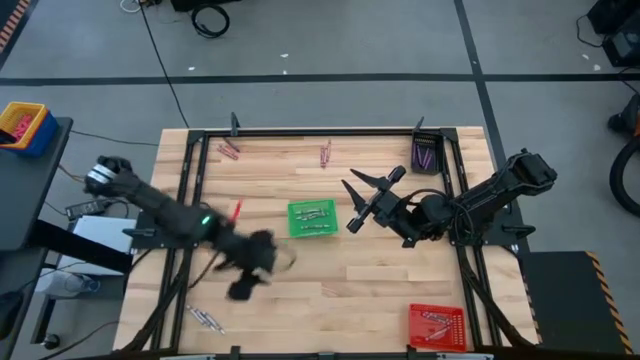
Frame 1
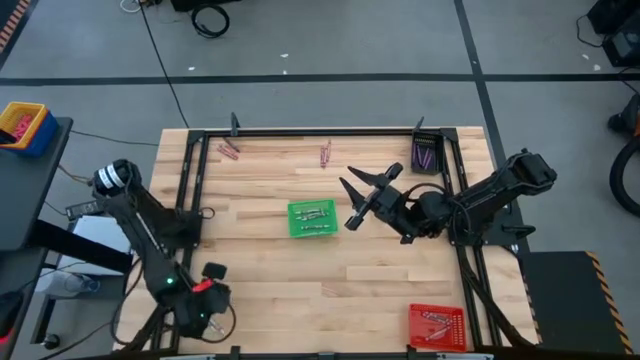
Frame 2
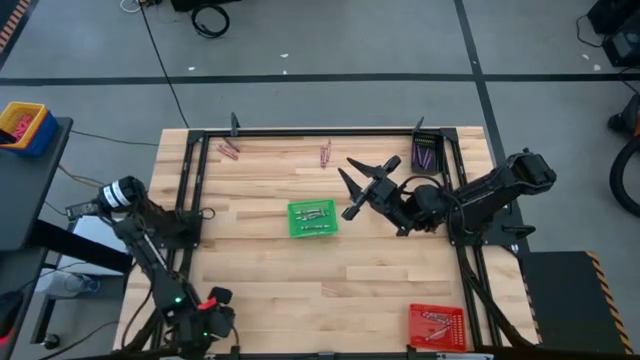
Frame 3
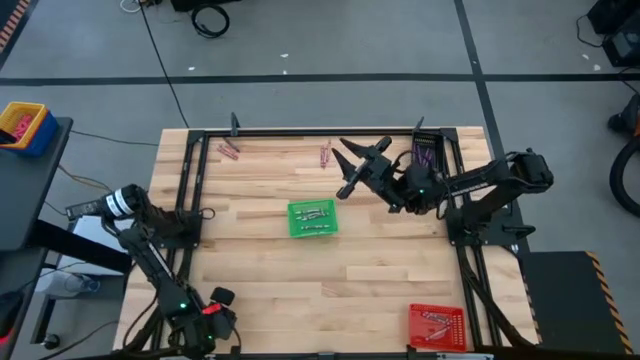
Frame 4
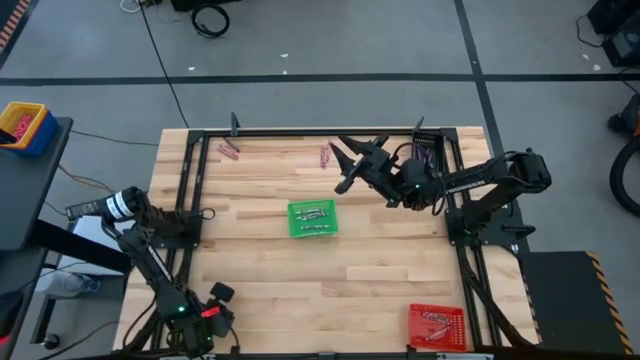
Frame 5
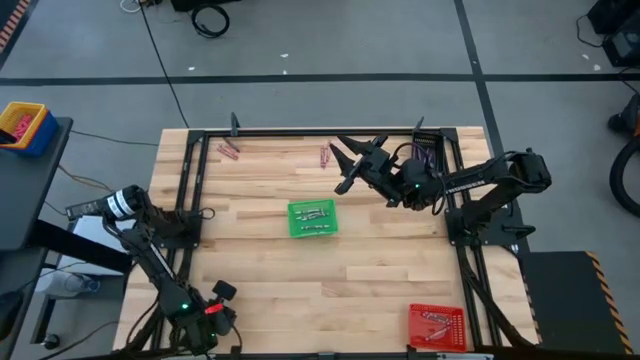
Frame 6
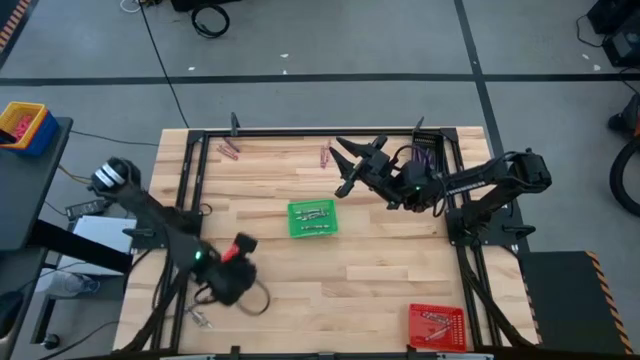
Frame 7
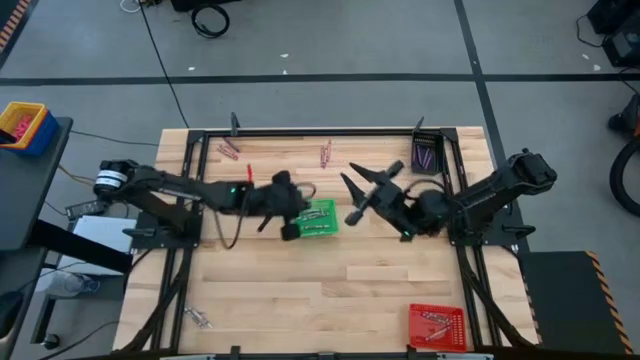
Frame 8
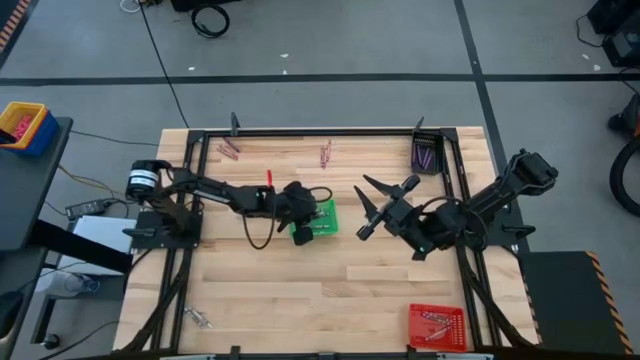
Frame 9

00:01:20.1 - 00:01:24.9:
Task: Sort crayons
Put the white crayon into the green basket

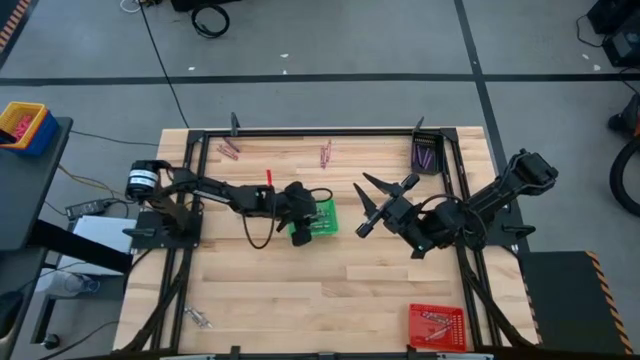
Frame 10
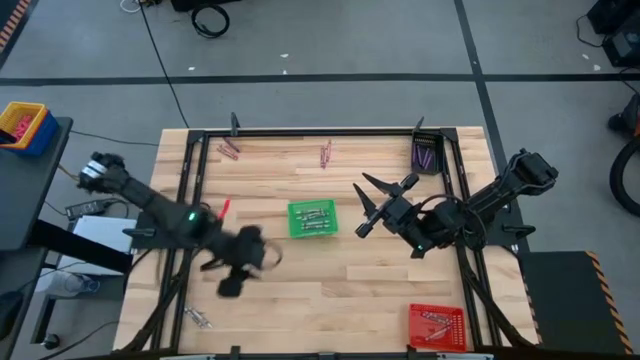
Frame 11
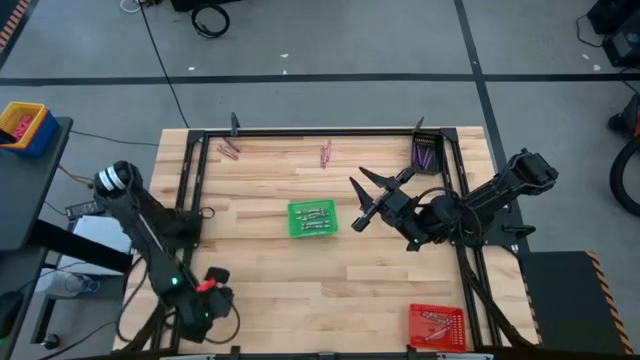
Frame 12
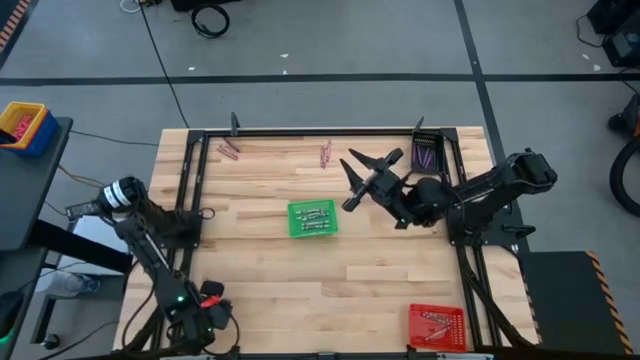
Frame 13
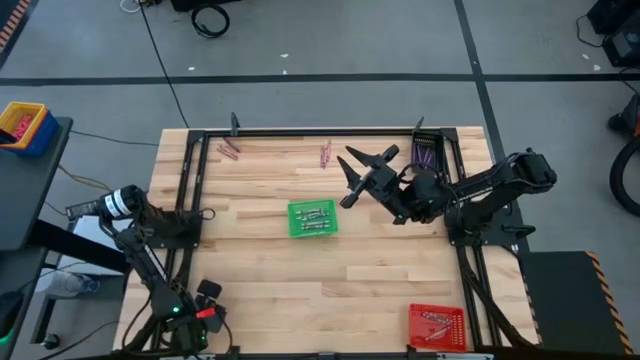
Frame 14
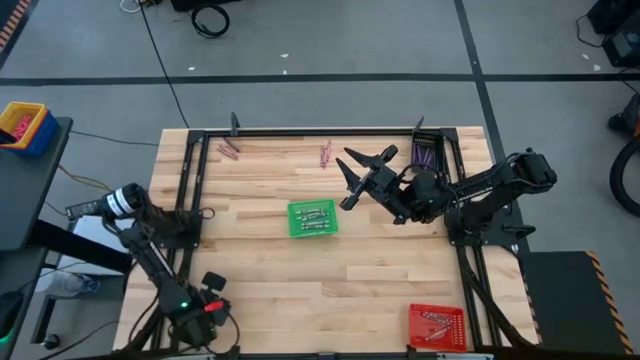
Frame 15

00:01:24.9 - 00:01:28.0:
Put the white crayon into the green basket

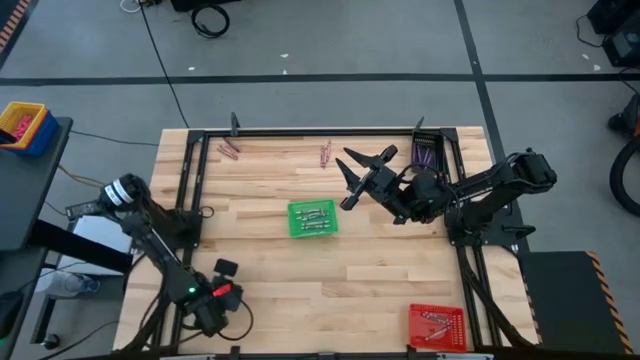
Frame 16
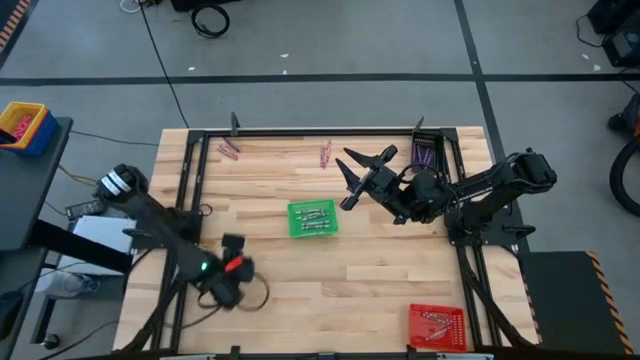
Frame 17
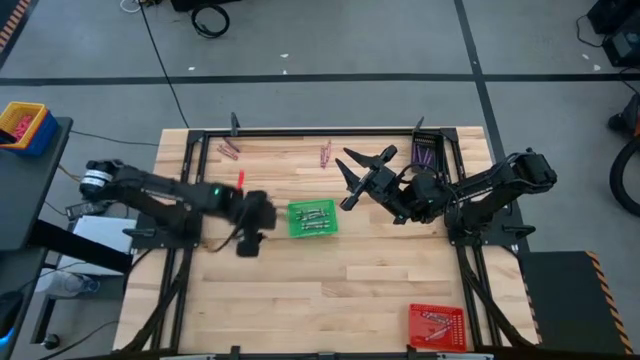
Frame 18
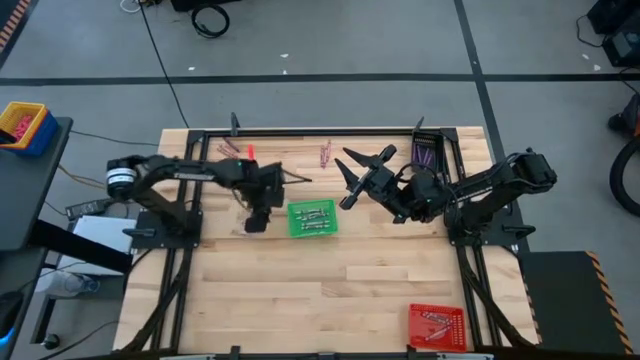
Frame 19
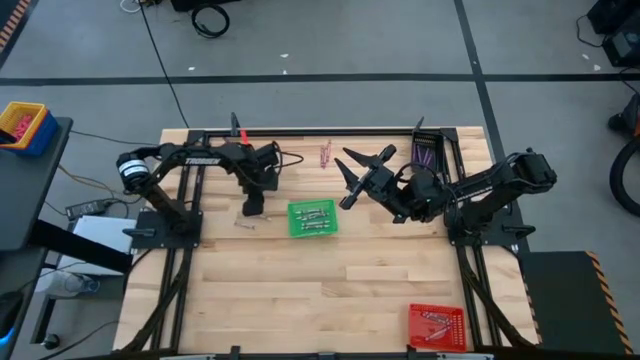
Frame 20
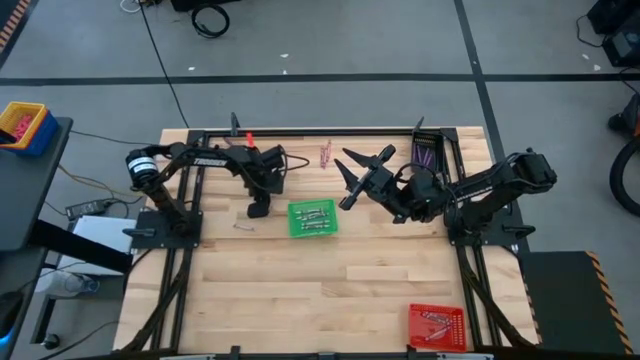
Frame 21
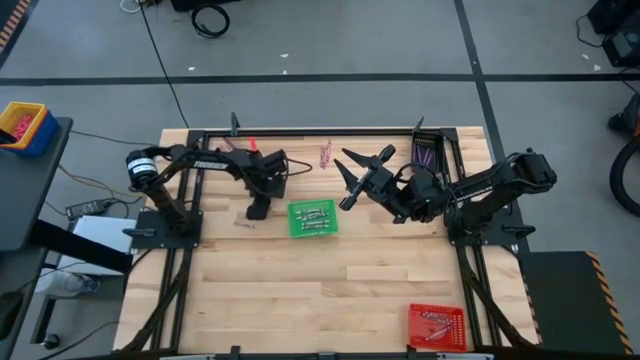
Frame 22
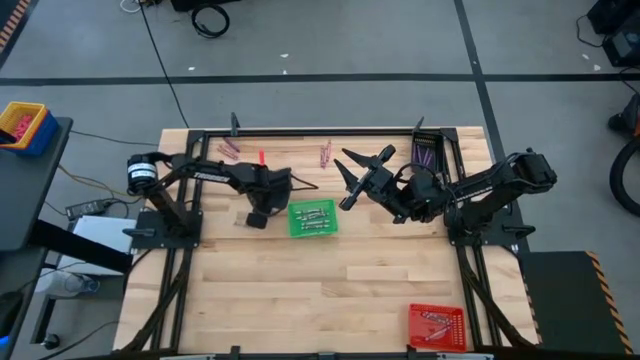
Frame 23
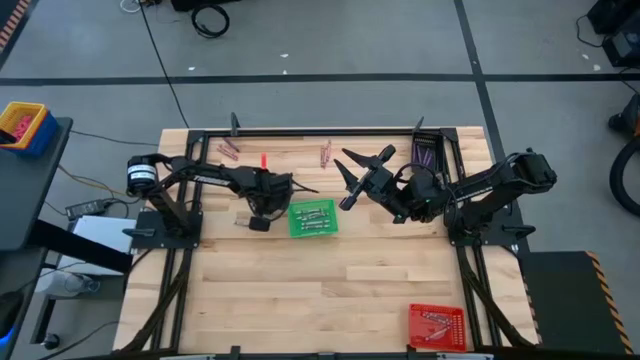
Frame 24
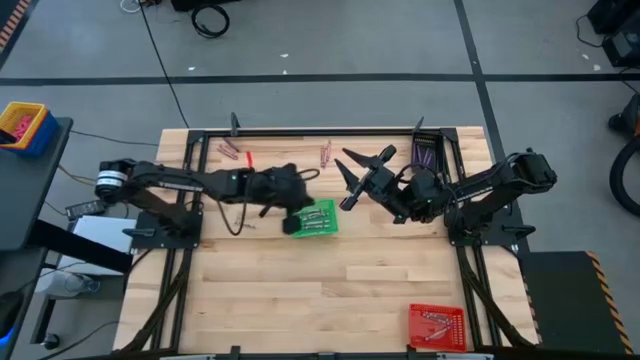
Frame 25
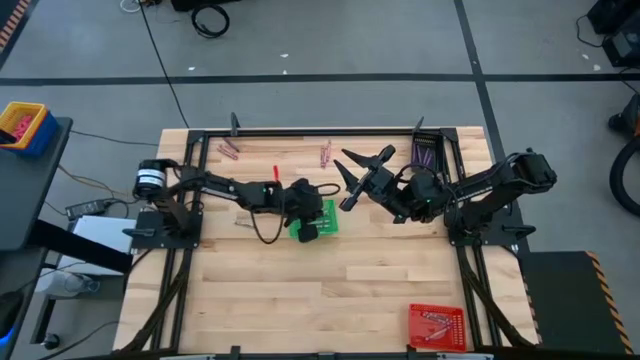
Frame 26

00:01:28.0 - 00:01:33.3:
Put the white crayon into the green basket

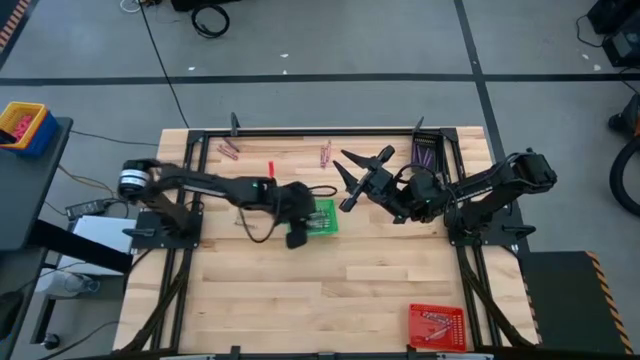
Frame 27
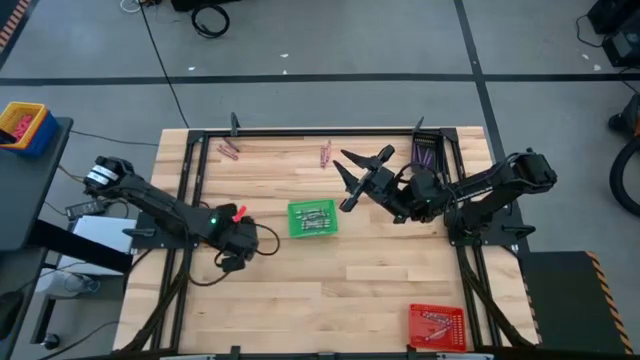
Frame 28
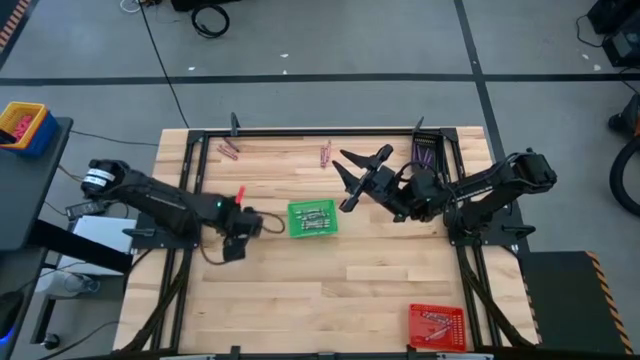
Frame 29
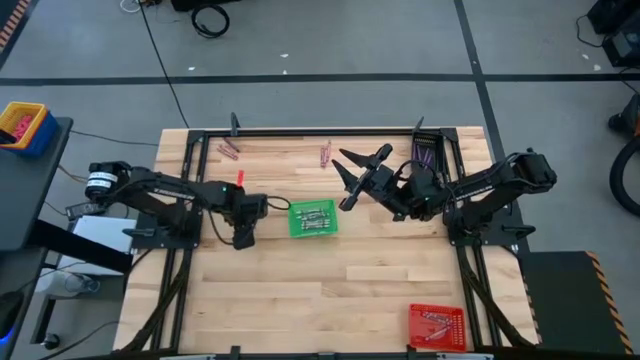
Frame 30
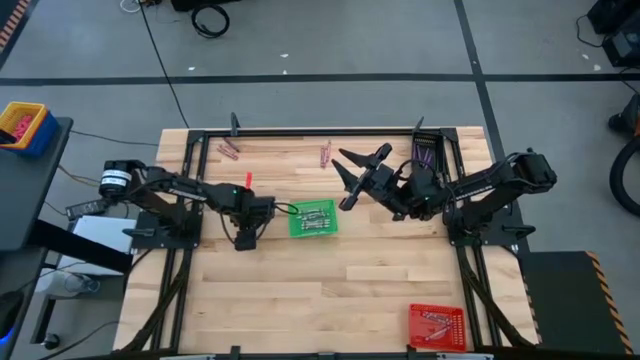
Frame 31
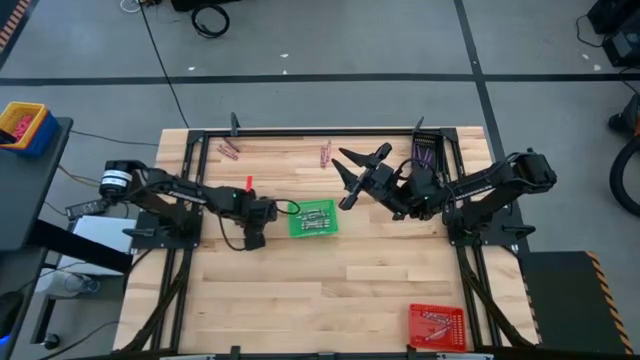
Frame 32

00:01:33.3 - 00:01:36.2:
Put the white crayon into the green basket

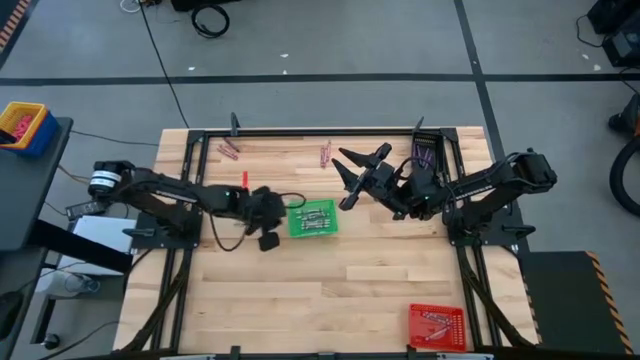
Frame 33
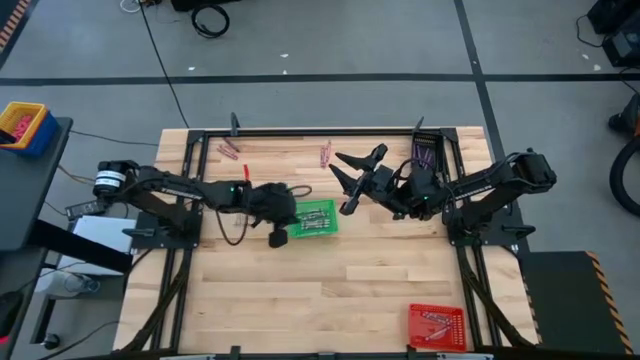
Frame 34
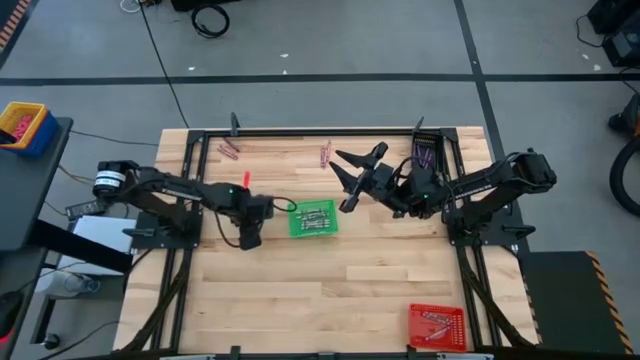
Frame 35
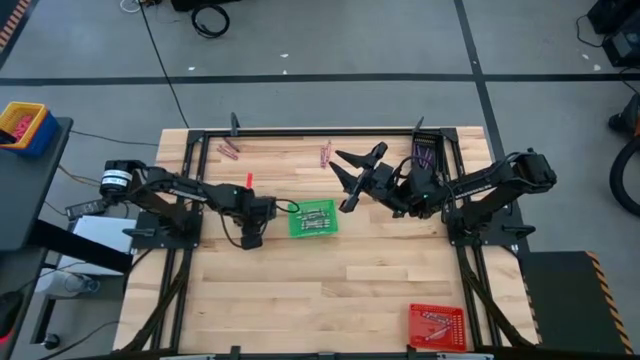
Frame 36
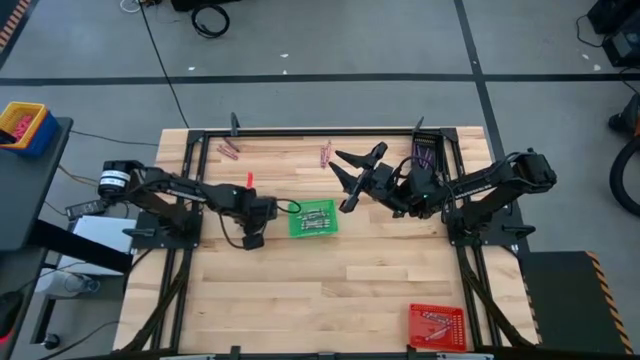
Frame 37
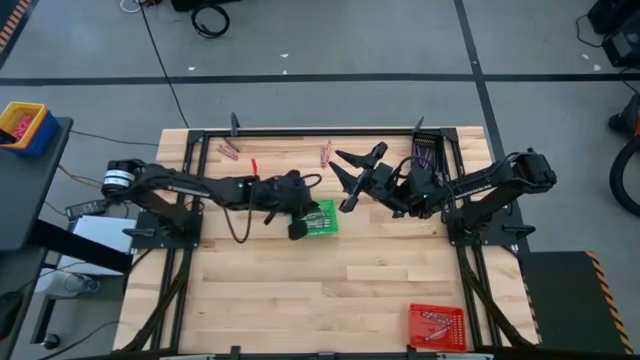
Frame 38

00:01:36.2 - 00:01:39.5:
Put the white crayon into the green basket

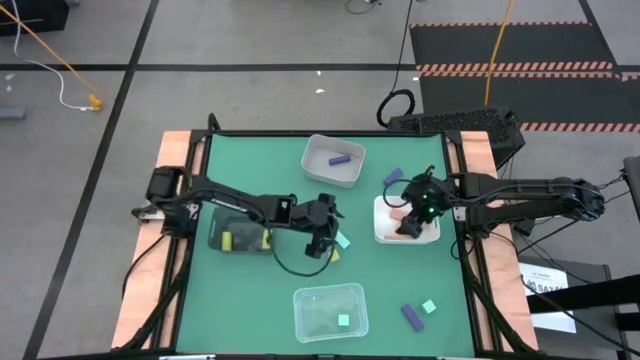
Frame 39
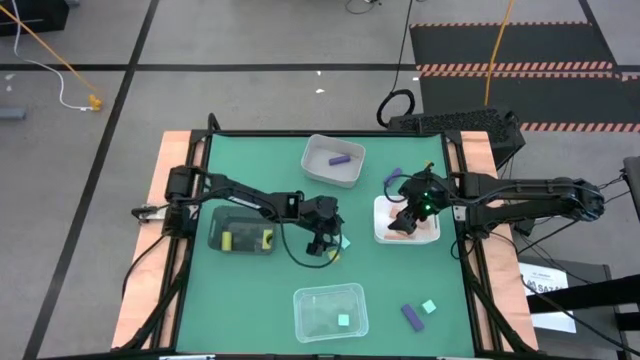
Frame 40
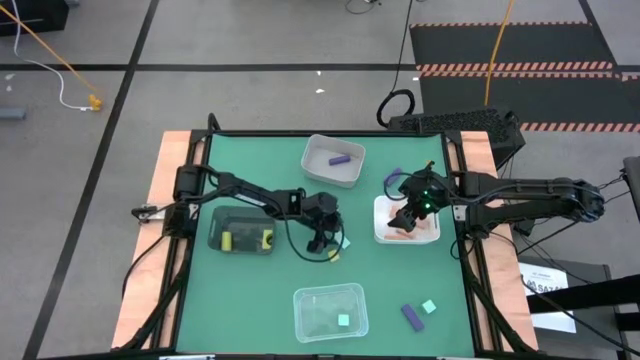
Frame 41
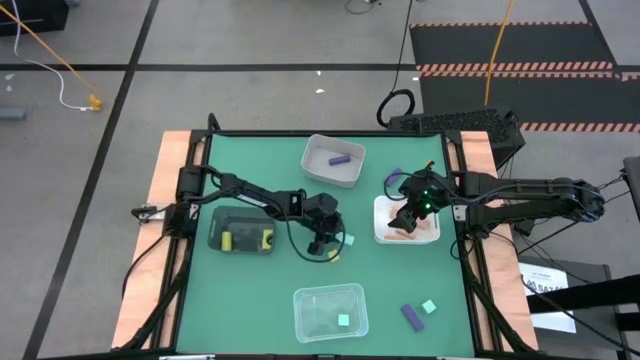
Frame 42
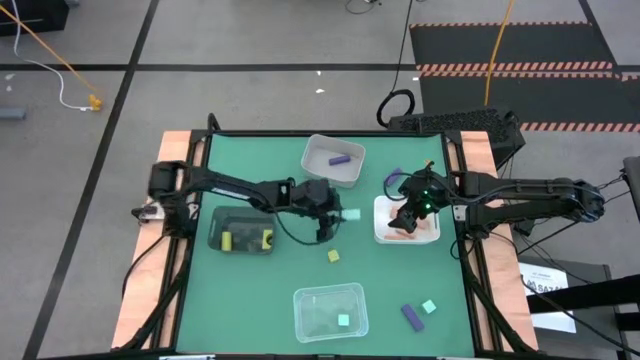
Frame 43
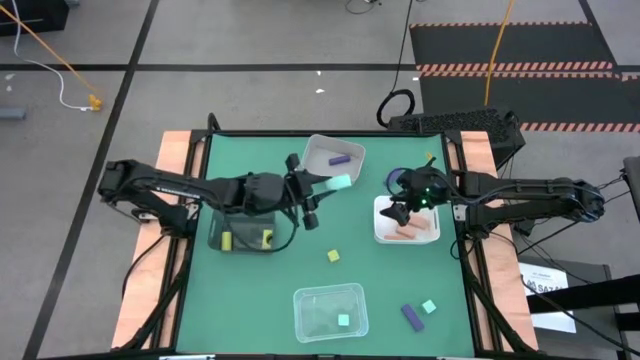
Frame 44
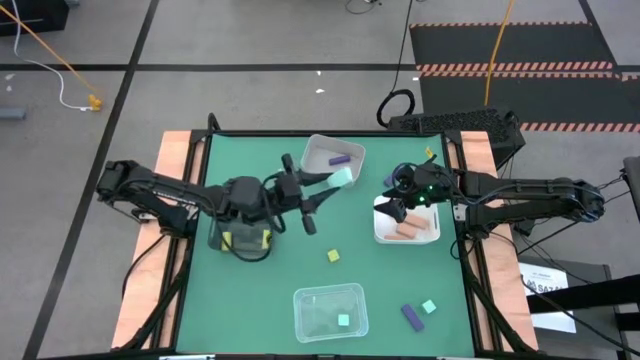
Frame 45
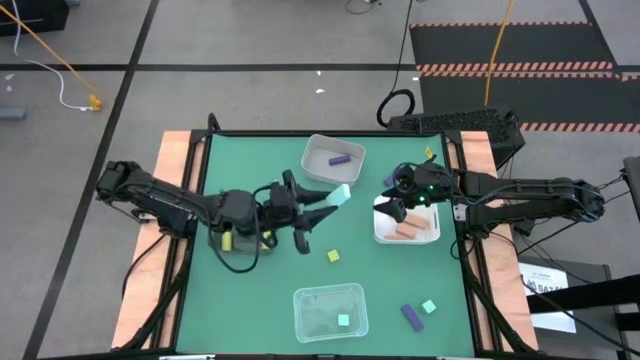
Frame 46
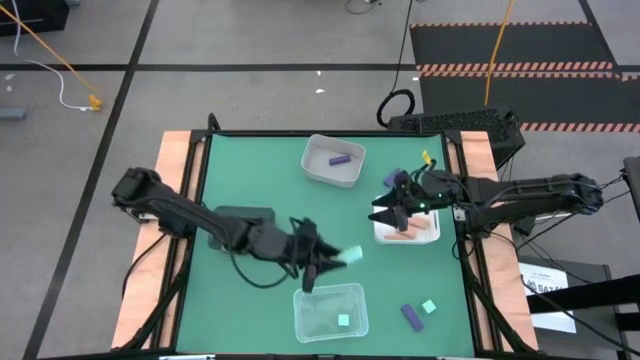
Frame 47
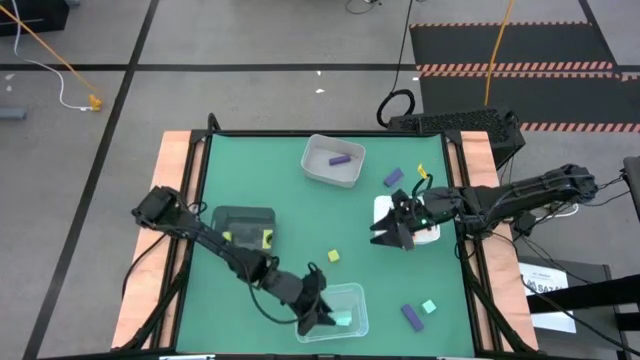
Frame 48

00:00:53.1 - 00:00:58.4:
Task: Sort & place blocks by color
Put the top light blue block into the transparent bin
